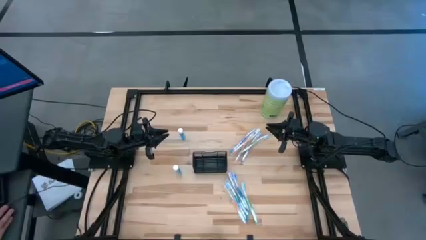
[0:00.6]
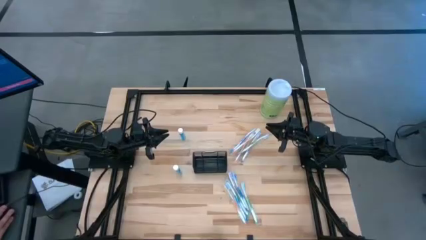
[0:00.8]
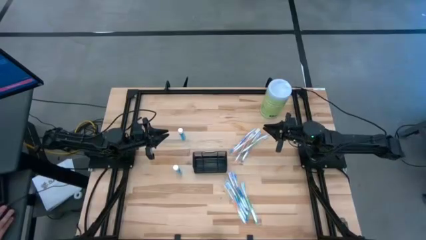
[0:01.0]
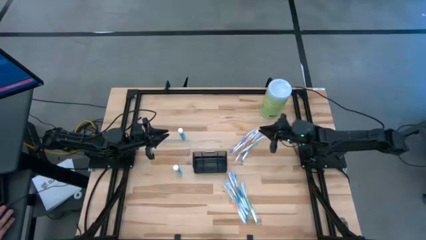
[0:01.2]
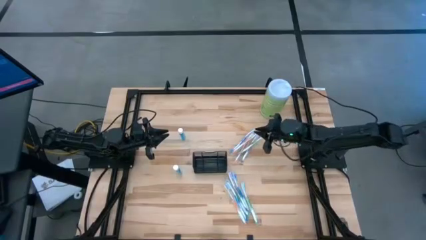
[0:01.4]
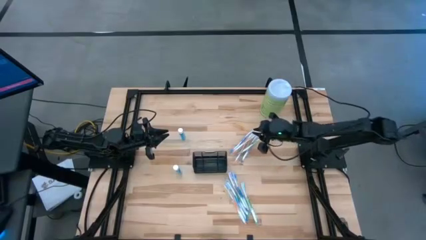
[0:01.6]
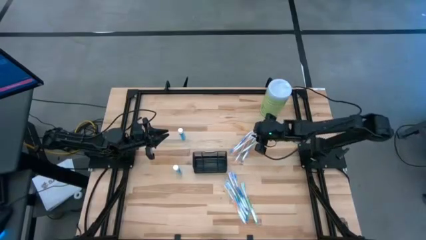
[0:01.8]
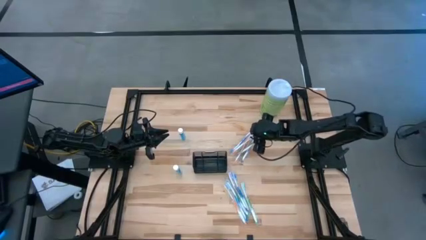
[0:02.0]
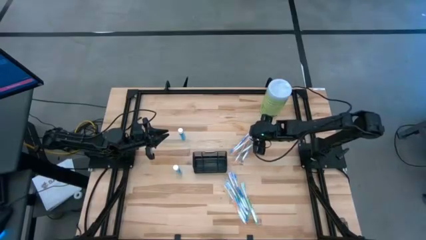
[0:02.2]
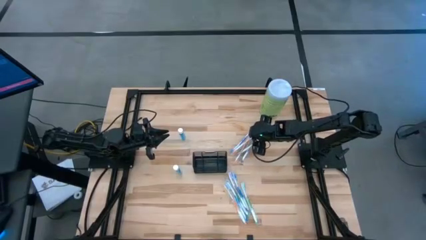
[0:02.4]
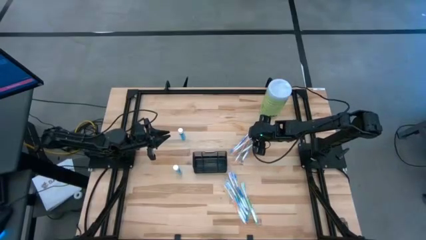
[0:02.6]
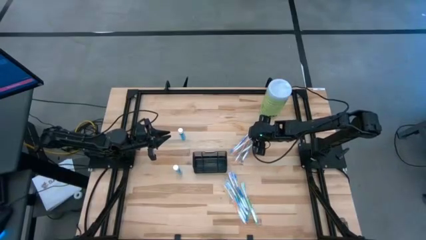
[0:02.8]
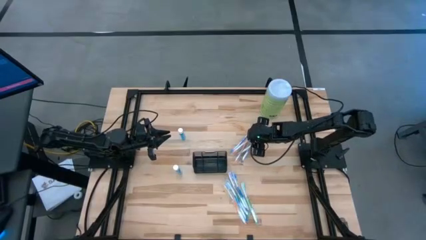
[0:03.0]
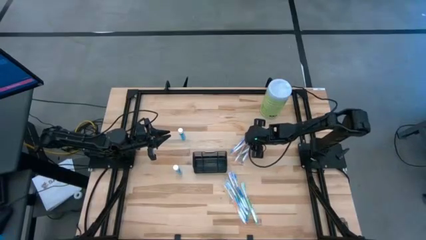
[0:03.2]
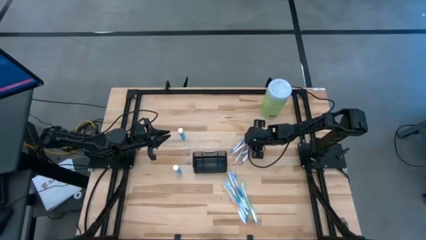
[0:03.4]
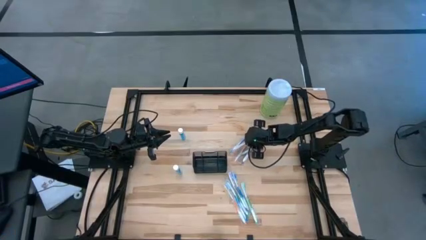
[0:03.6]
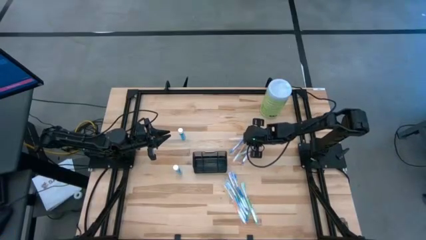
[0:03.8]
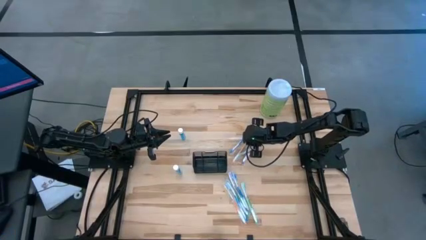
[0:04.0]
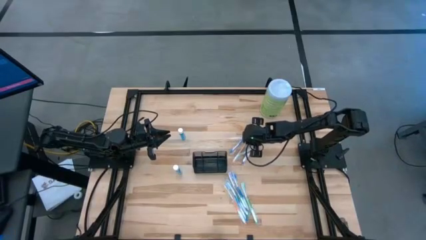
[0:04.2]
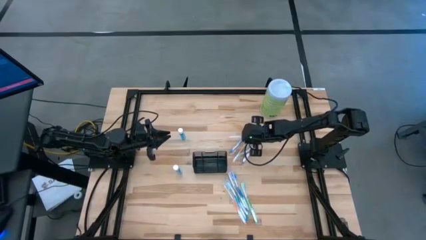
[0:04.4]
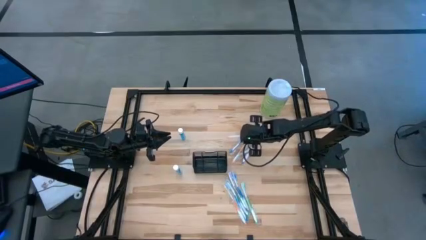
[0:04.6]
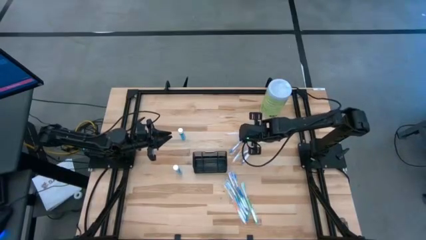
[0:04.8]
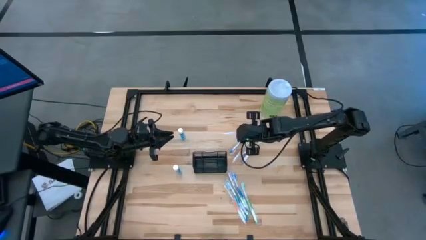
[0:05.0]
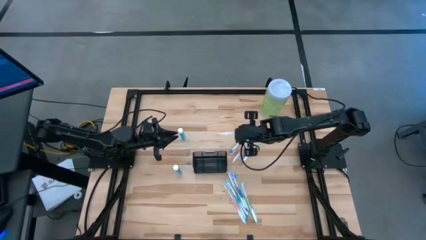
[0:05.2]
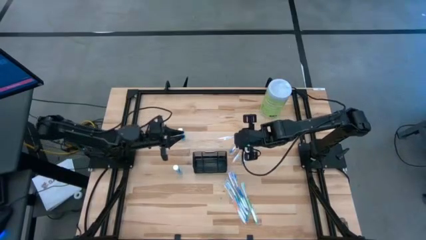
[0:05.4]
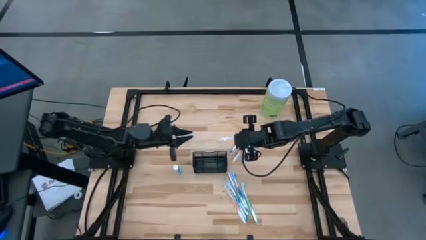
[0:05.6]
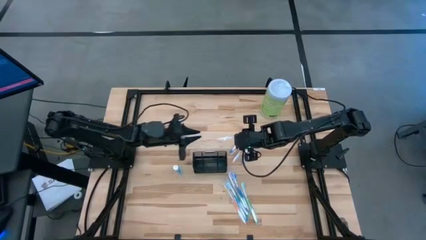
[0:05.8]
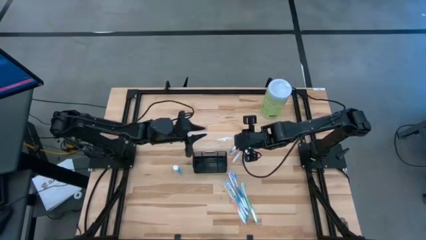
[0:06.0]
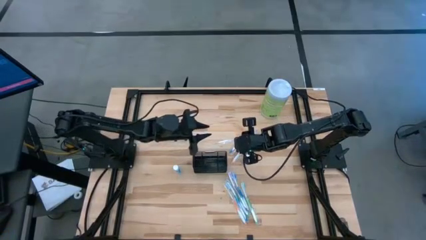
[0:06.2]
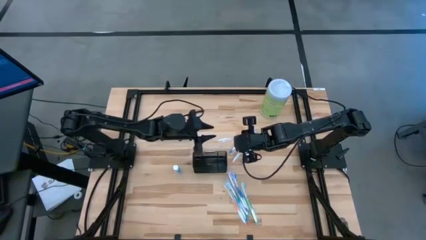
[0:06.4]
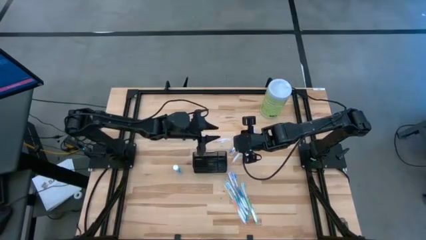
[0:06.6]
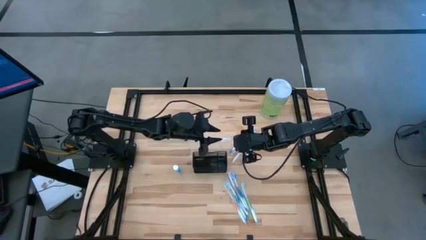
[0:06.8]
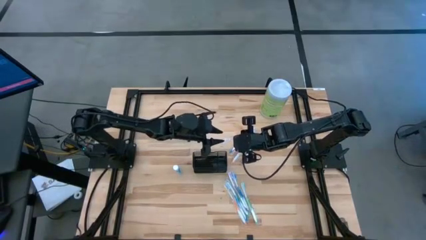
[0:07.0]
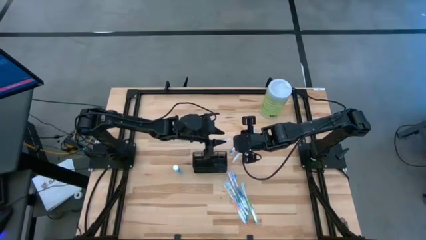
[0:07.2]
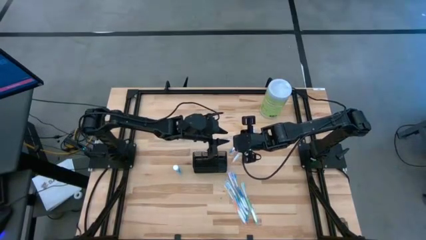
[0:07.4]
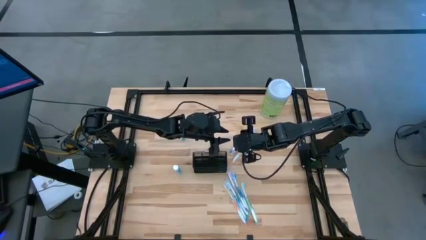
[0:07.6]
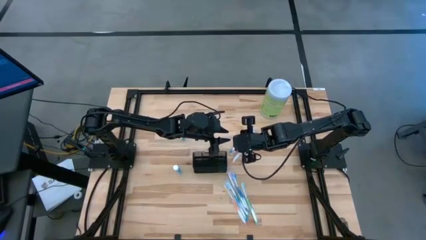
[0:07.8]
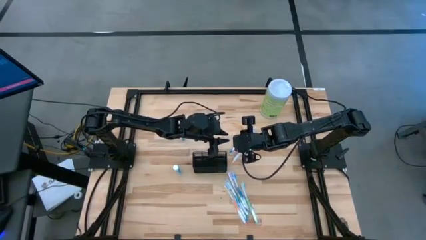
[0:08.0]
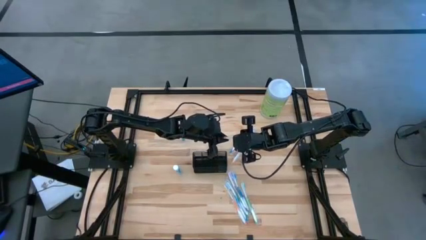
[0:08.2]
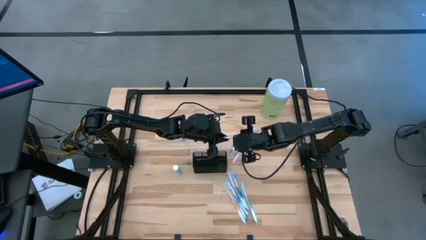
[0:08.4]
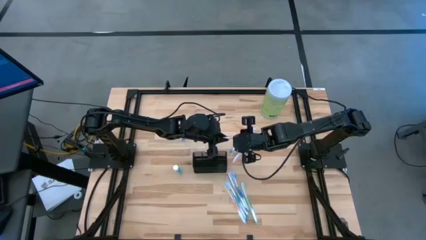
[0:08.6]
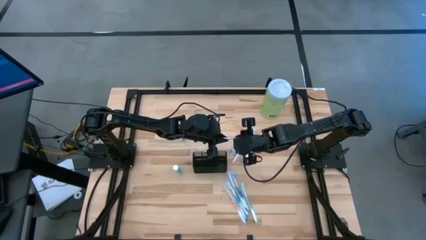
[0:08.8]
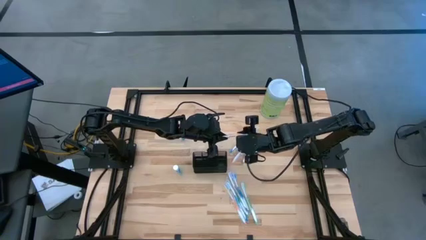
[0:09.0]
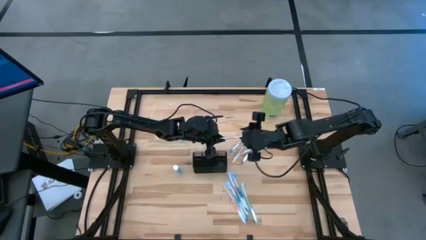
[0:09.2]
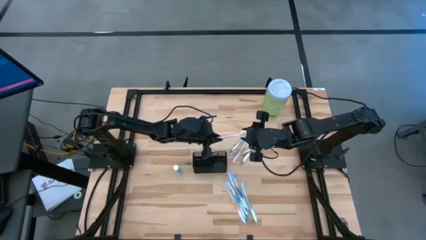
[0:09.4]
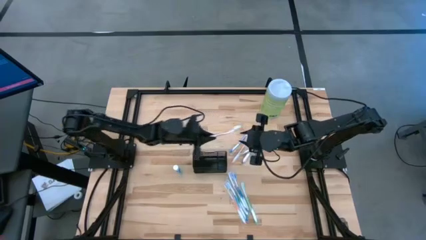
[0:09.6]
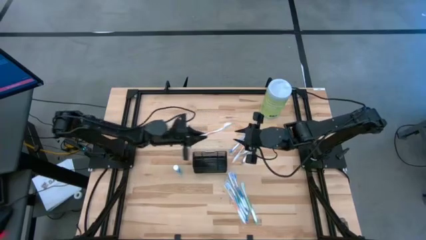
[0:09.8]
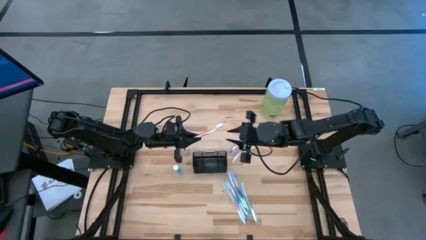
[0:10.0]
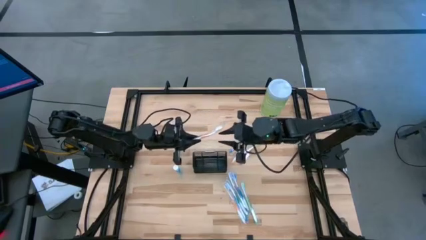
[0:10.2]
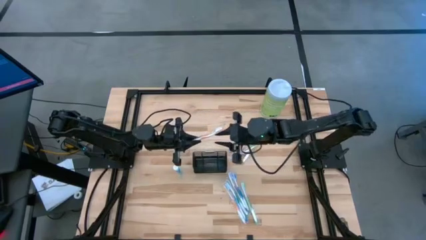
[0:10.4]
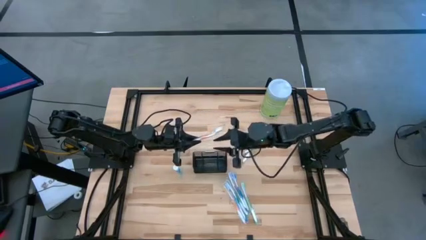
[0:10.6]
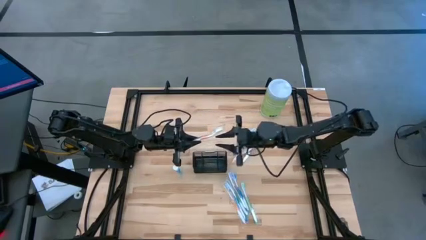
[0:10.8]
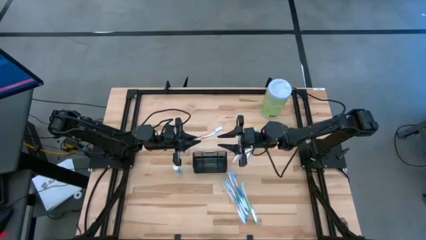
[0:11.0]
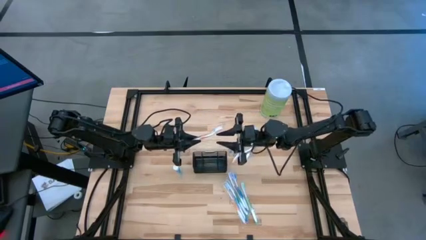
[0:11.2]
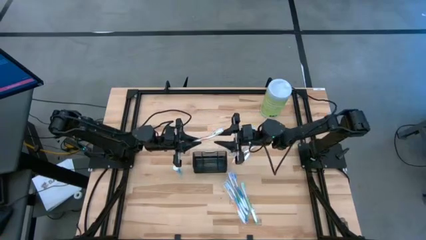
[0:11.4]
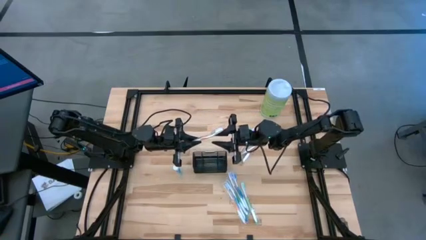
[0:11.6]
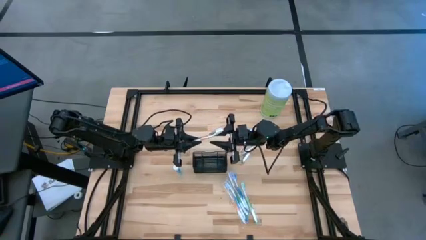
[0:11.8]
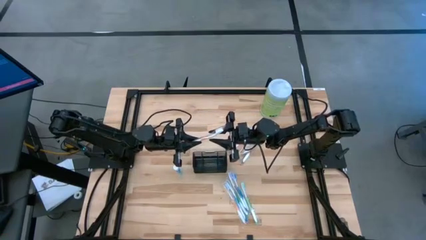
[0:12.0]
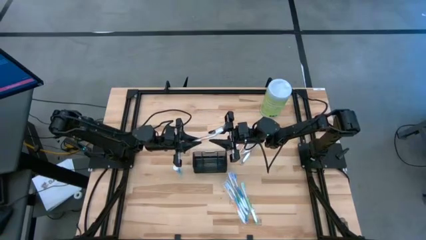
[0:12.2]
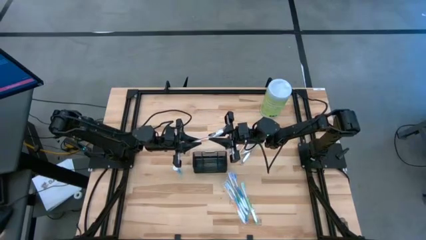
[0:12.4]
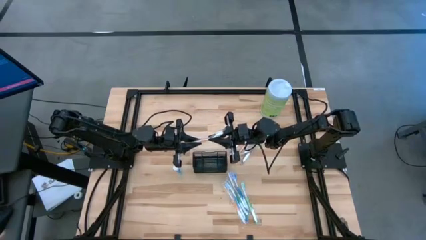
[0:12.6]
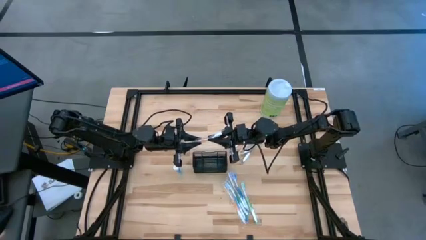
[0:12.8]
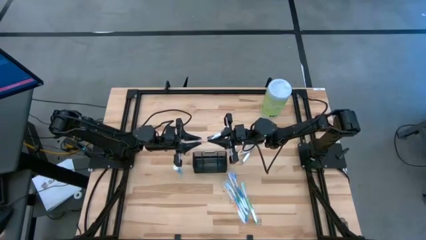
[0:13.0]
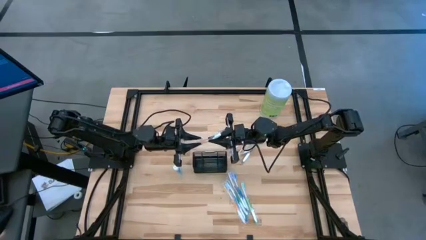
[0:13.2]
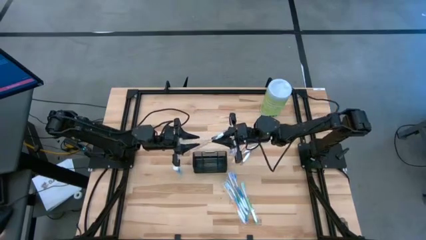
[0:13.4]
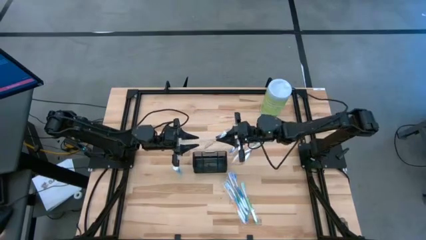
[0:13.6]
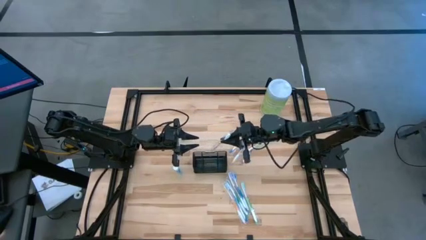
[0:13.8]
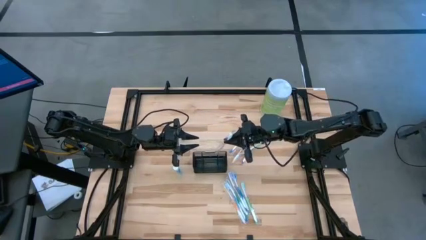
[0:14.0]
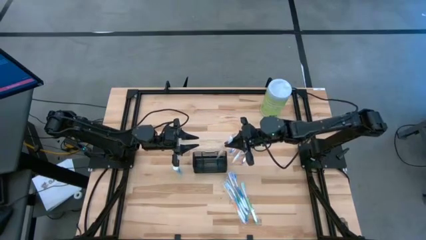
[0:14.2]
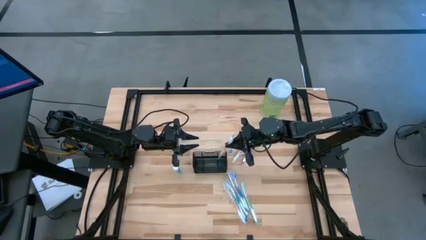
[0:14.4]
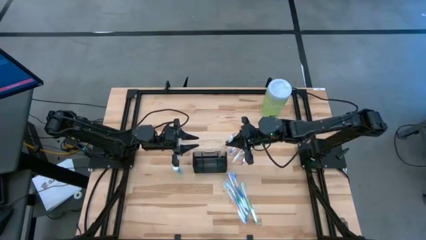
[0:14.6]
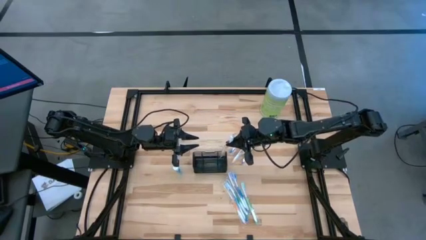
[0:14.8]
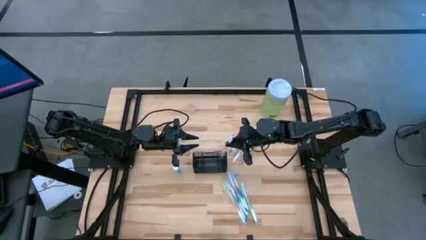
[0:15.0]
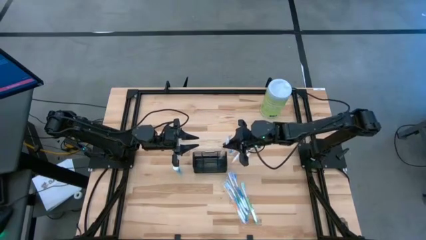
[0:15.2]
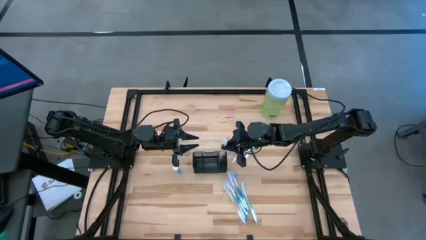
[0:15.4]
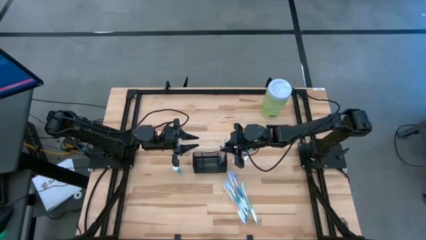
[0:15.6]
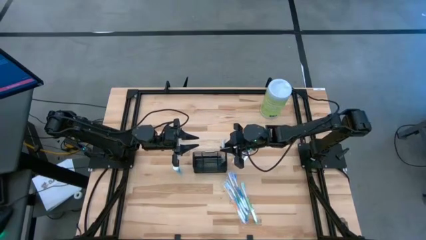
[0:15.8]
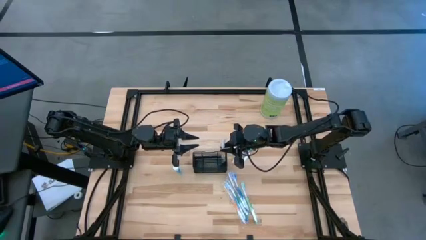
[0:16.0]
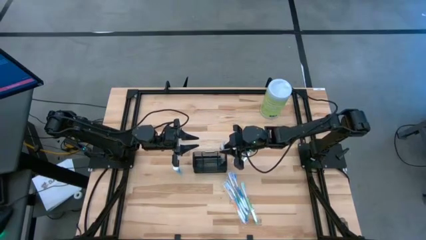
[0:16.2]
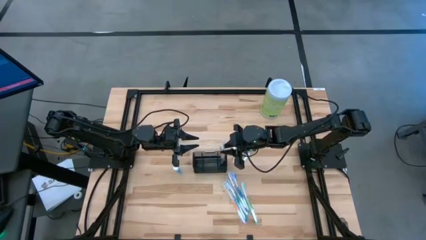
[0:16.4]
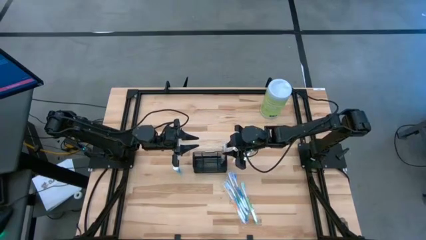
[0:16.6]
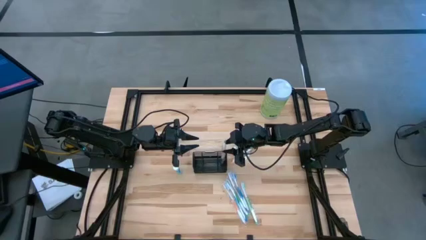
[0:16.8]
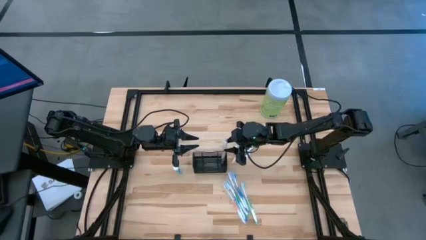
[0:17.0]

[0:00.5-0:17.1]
Task: Pick & Place toothbrushing station
Put the orange toothbrush into the mesh
